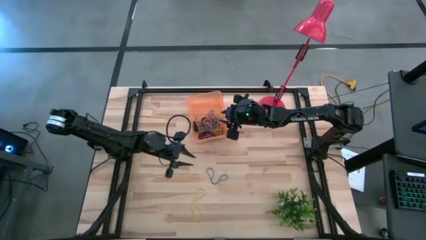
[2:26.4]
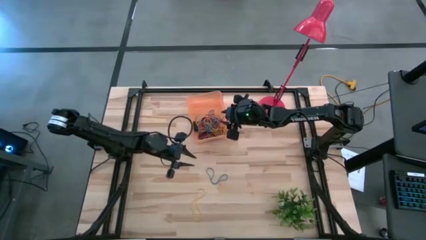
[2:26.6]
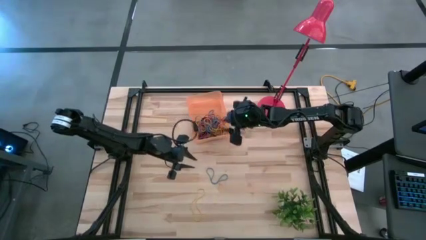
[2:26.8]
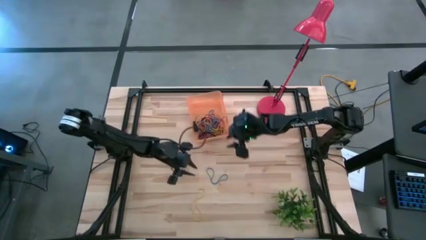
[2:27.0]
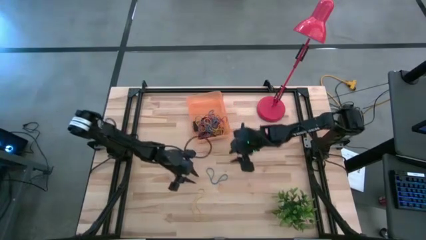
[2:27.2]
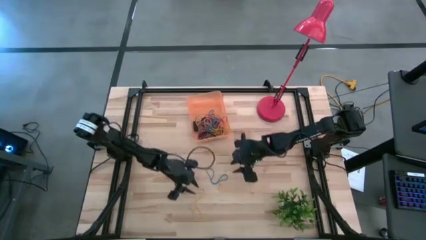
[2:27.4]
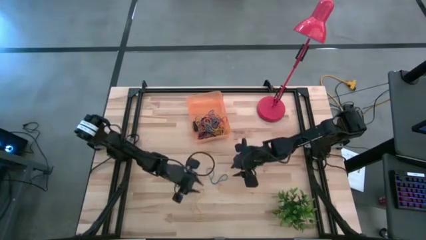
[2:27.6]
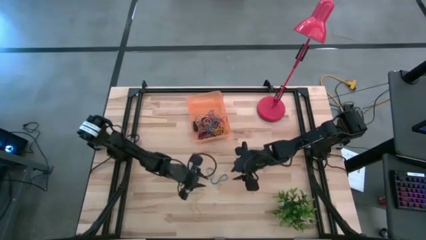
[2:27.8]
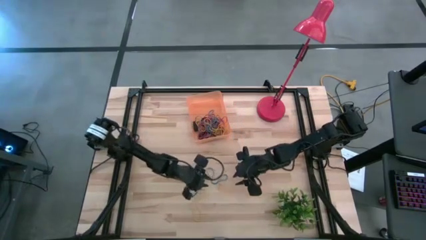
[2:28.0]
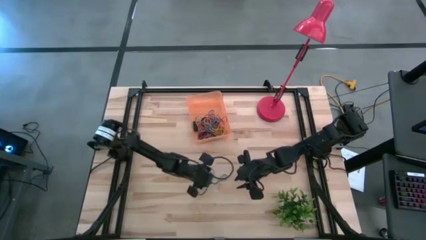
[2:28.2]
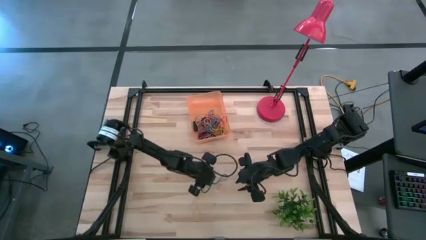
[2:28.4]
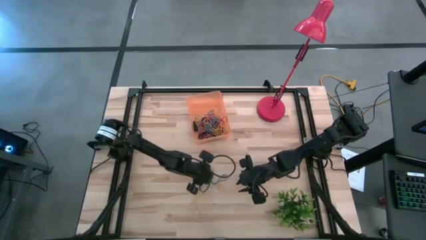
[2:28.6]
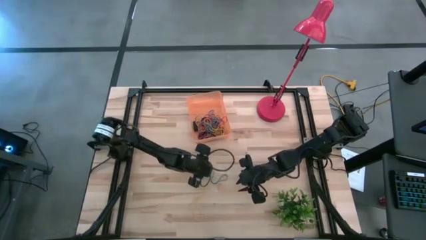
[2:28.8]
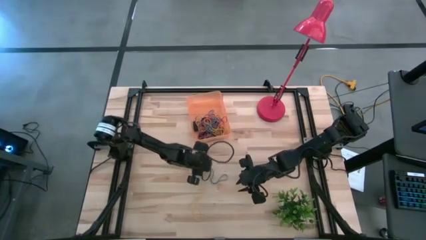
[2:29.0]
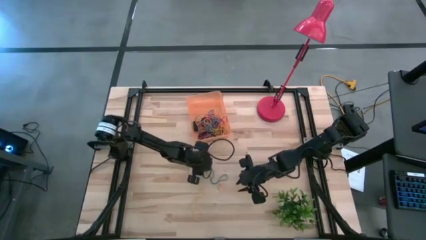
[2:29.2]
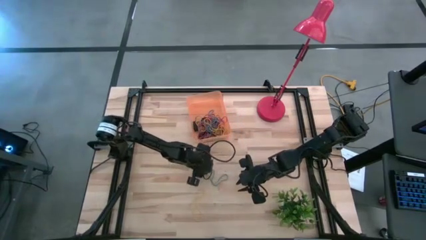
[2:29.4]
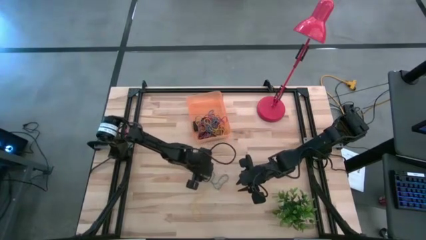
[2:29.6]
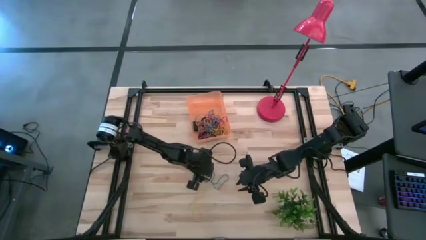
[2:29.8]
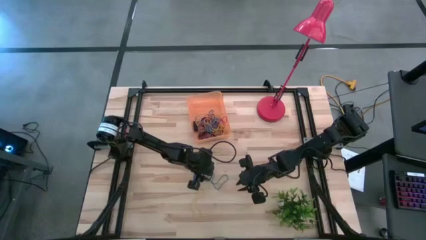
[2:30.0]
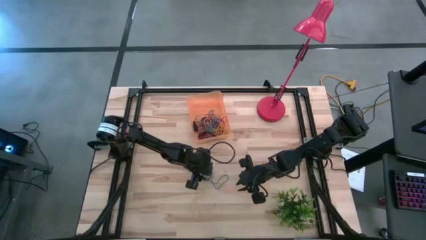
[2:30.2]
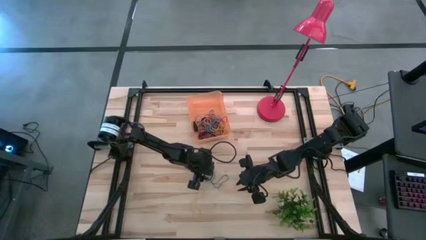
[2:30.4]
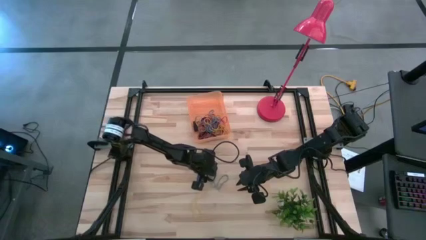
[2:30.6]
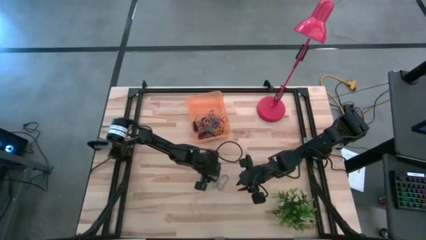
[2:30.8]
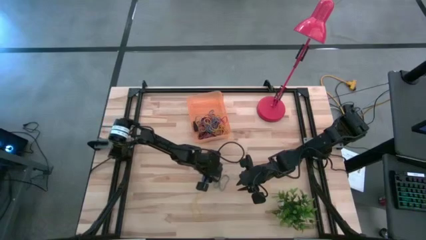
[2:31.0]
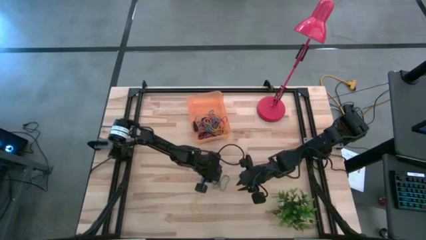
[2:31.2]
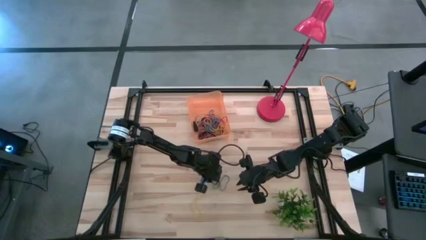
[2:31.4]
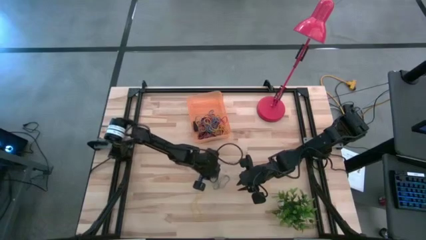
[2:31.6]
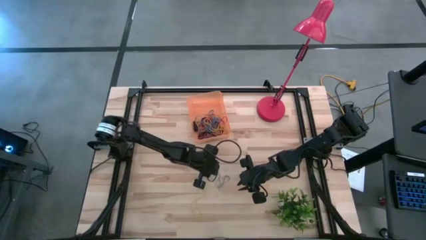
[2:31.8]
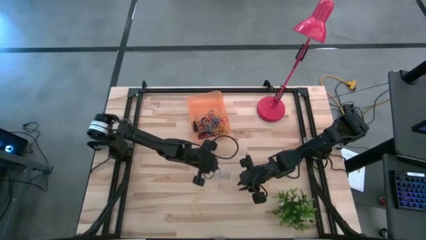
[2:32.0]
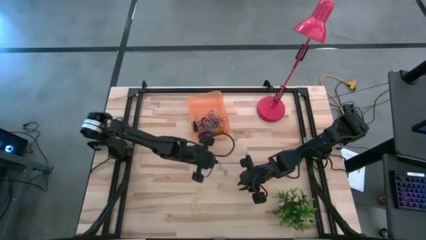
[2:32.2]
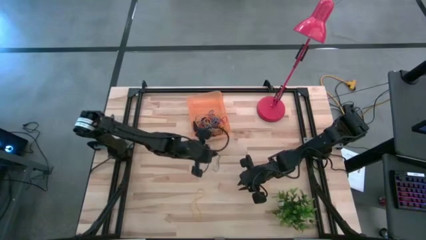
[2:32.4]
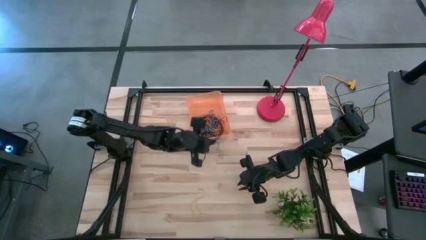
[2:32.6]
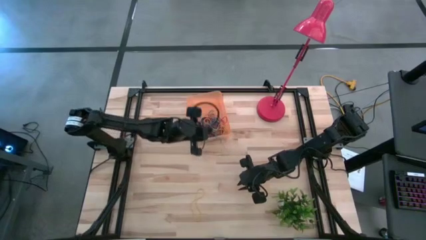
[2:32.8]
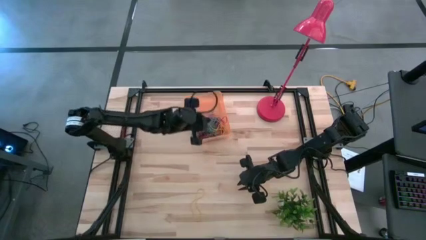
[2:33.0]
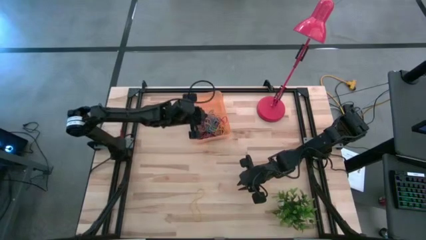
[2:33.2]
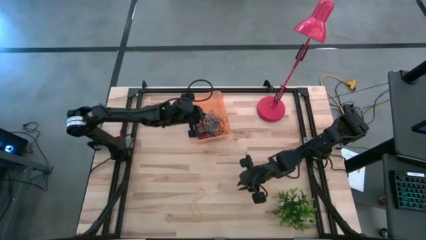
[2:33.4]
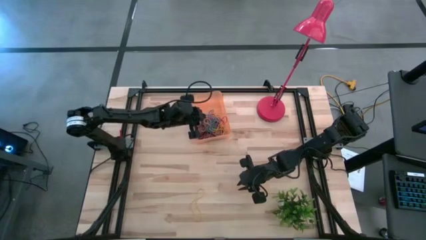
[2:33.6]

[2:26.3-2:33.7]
Task: Pick and place rubber bands into bin
Put the blue rubber band into the orange bin

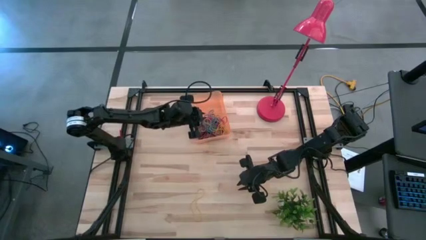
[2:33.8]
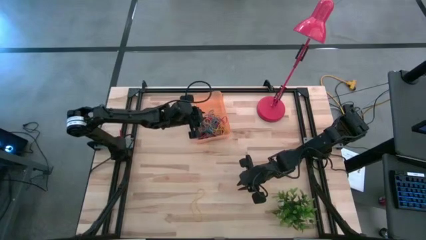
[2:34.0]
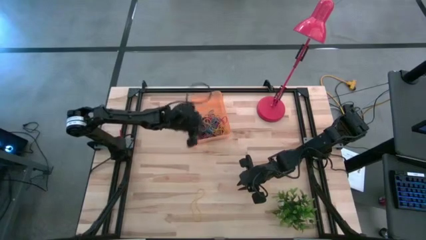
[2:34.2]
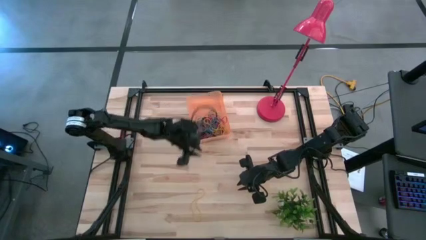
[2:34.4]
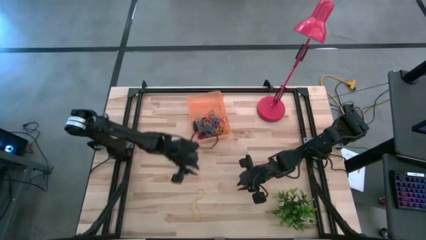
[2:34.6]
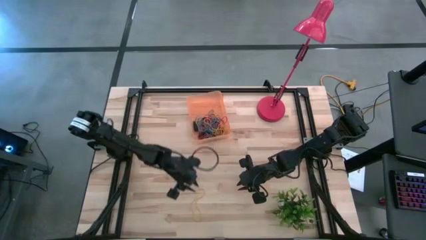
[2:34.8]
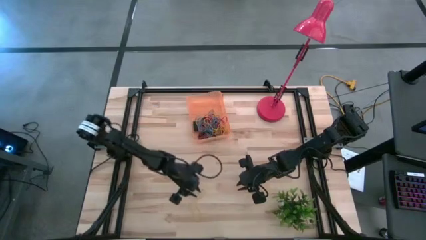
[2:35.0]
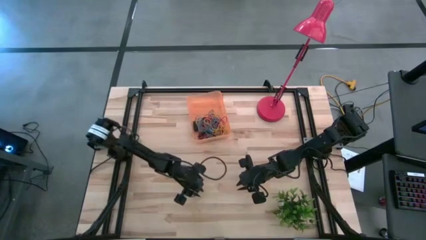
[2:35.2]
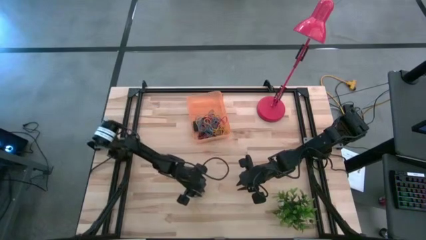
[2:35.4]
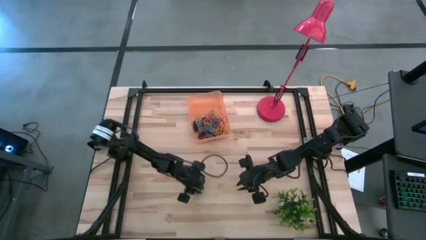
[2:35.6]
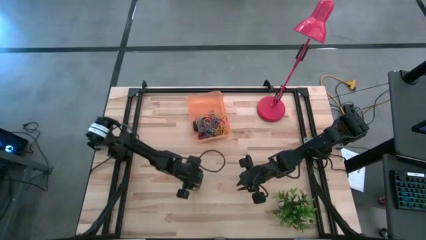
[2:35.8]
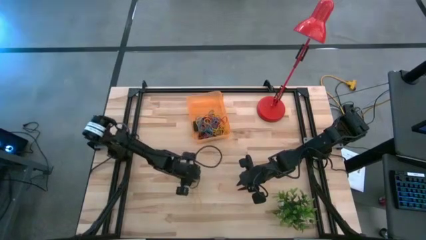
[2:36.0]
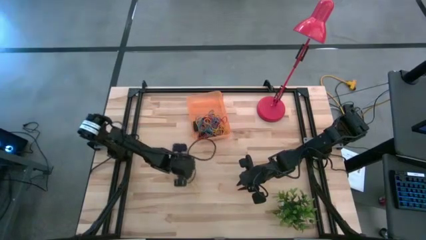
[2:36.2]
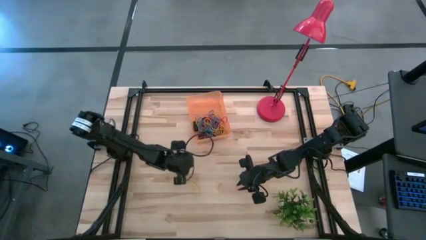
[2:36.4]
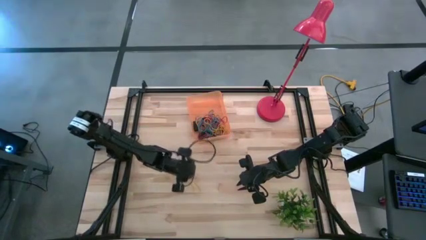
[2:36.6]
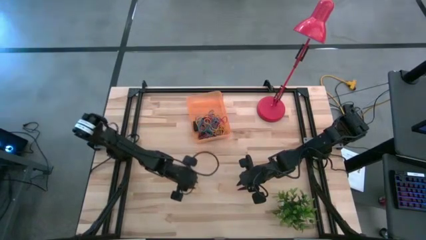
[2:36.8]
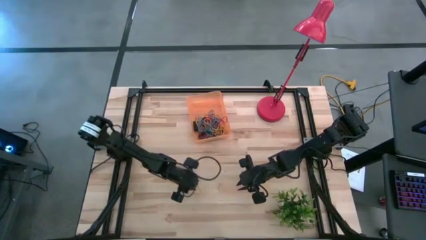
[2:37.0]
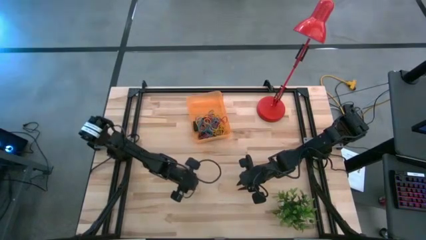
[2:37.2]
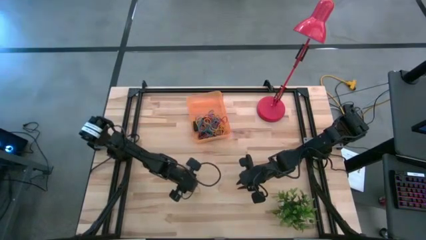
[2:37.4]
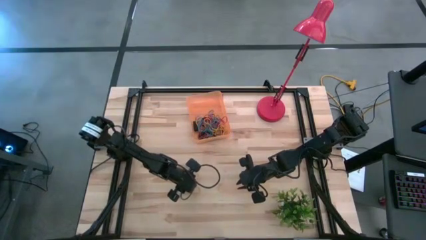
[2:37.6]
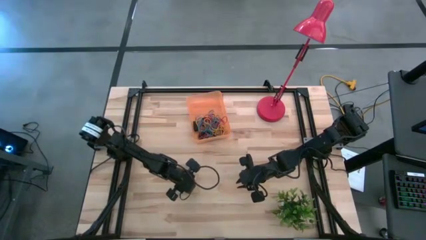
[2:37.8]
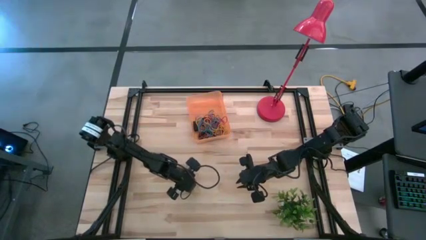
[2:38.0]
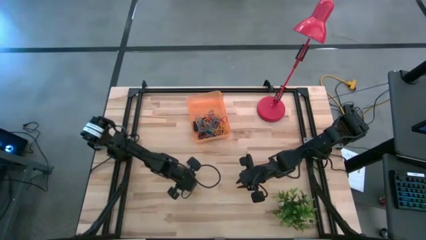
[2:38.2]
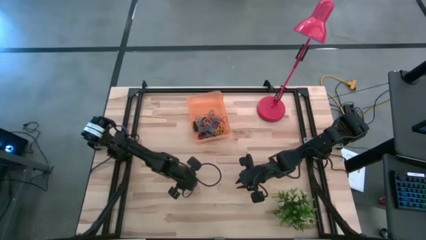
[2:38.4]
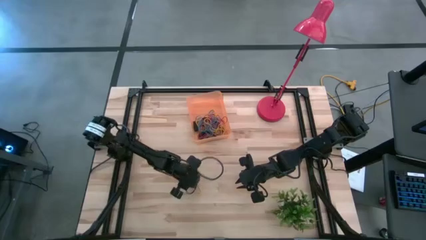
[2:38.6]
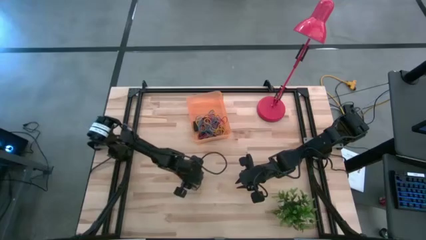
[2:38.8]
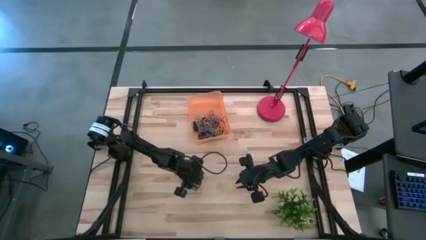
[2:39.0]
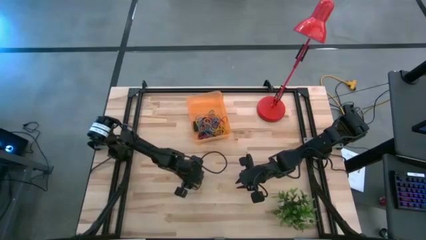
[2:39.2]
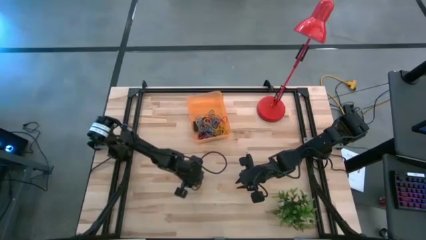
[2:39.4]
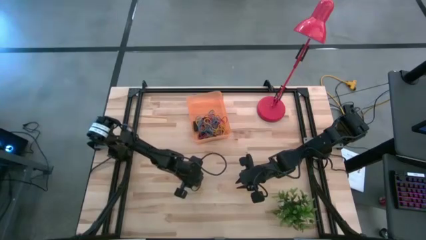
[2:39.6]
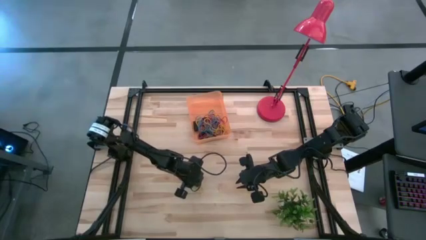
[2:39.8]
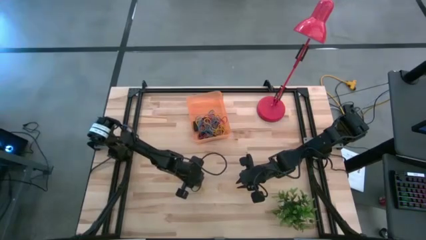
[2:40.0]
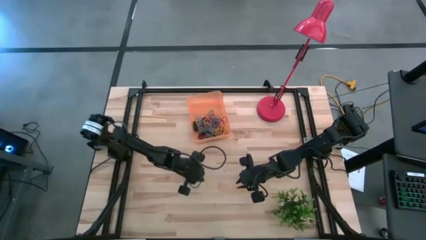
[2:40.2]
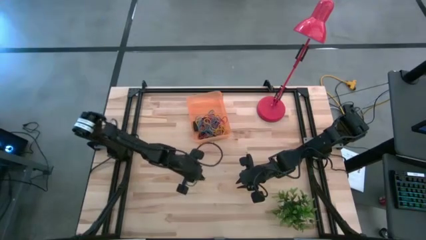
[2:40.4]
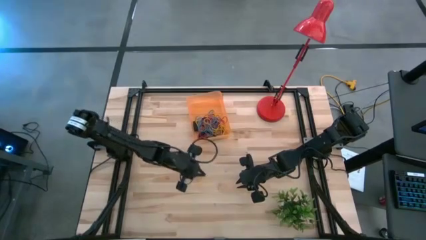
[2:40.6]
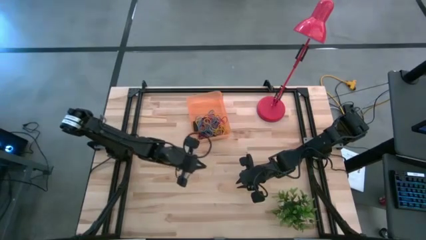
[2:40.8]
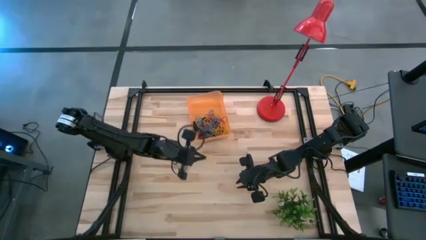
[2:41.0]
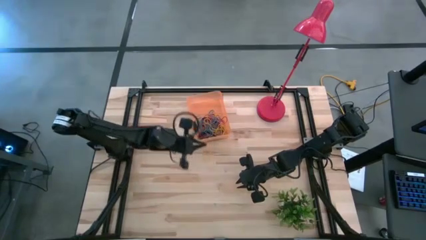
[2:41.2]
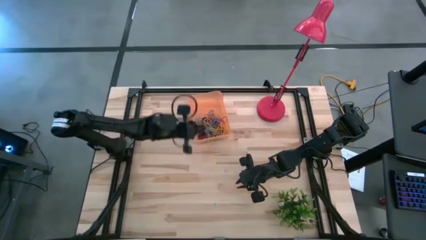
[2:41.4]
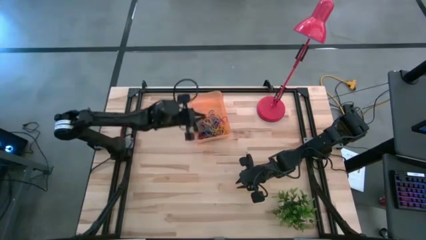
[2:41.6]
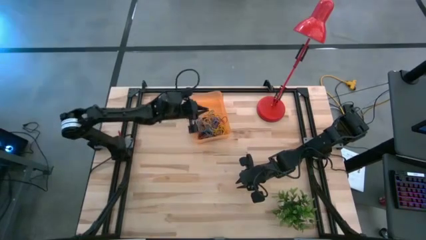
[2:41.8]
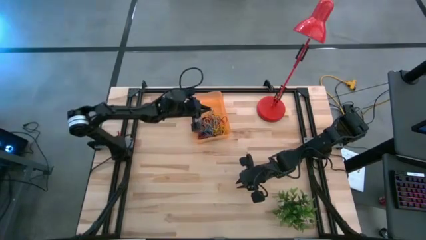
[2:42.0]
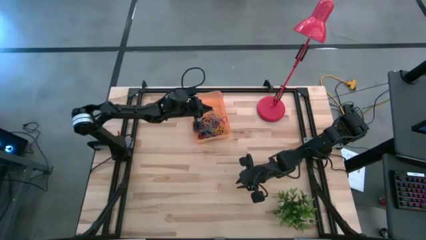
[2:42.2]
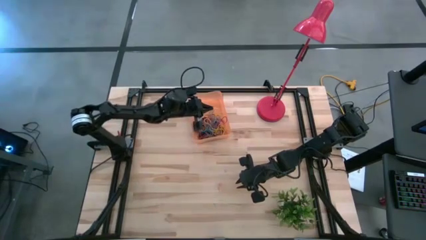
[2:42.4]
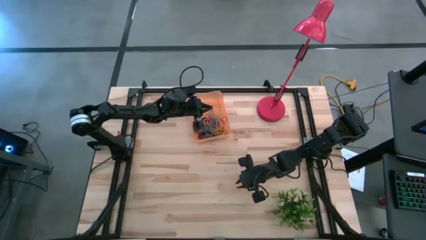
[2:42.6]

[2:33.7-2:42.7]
Put the yellow rubber band into the orange bin

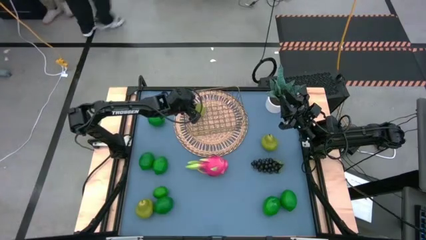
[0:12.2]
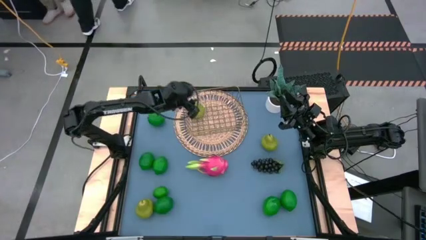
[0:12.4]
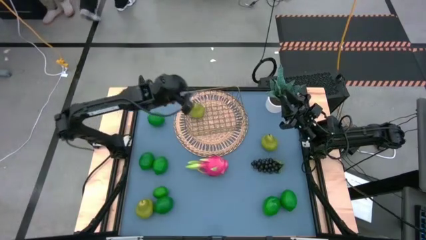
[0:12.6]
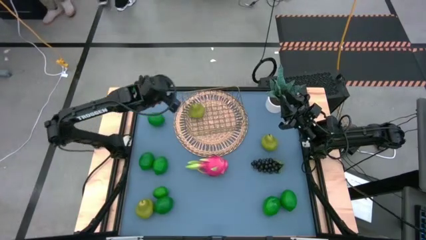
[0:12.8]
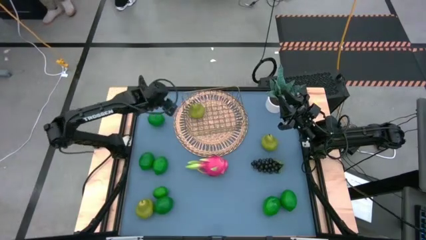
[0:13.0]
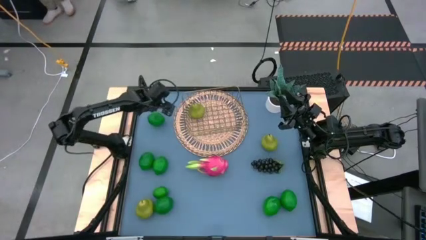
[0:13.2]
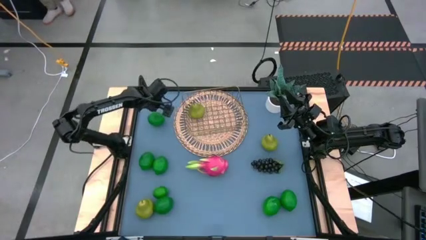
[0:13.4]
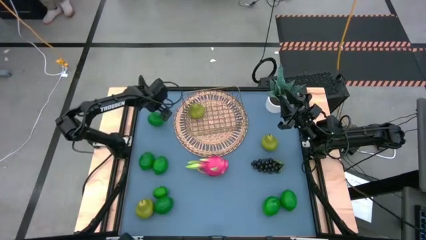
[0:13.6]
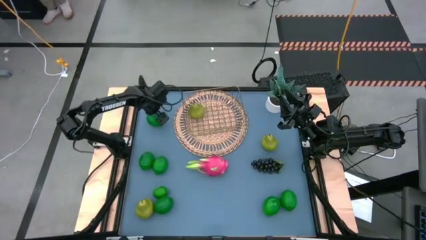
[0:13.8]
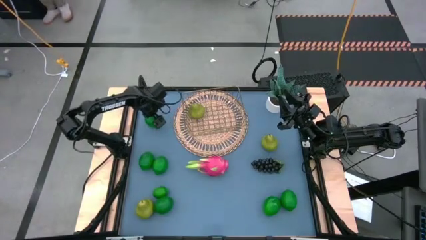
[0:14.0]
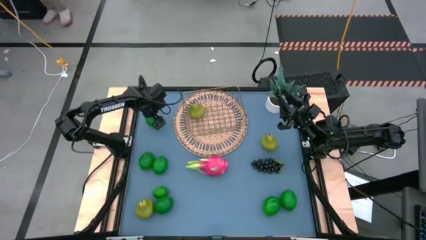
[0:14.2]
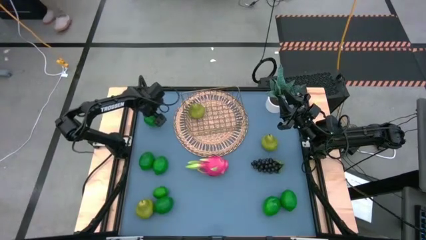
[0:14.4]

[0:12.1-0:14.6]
Task: Build produce basket
Put the green lime into the gold wire basket
